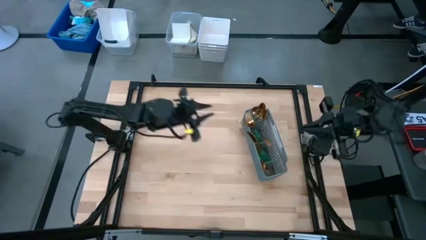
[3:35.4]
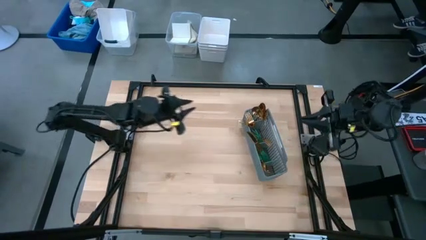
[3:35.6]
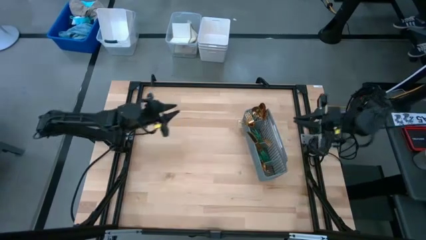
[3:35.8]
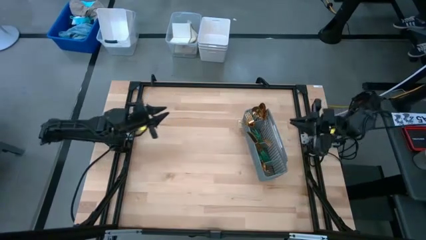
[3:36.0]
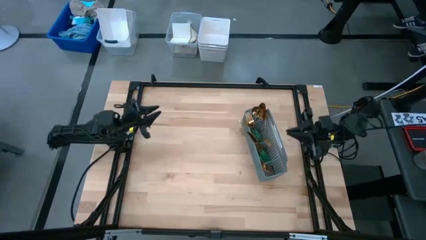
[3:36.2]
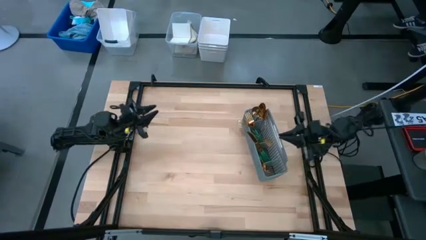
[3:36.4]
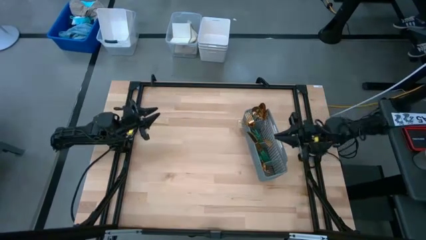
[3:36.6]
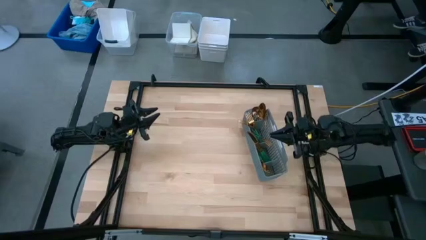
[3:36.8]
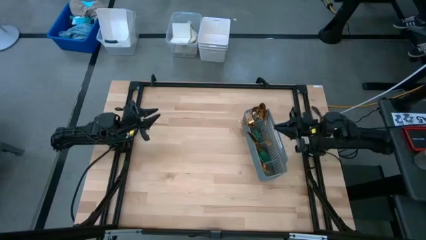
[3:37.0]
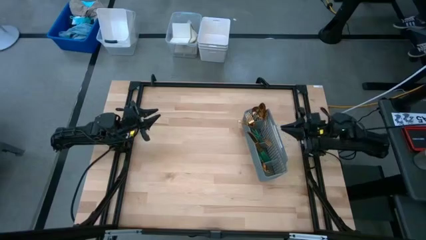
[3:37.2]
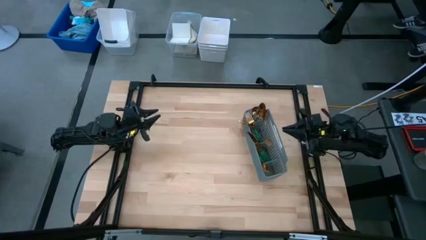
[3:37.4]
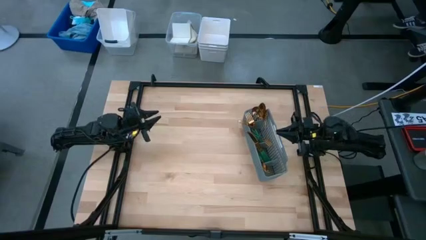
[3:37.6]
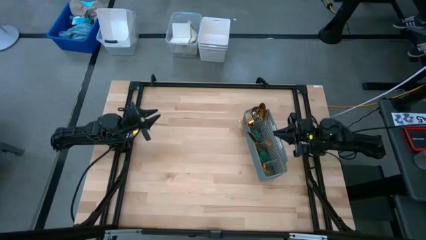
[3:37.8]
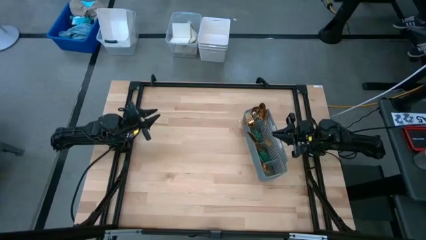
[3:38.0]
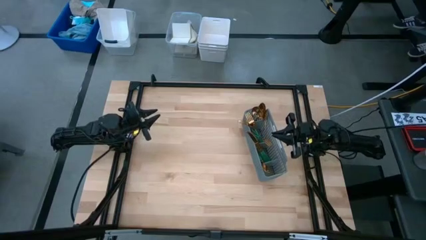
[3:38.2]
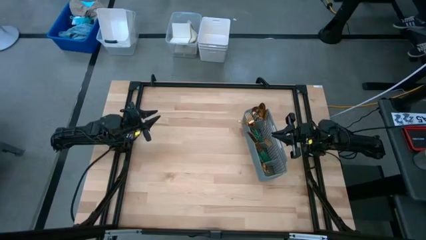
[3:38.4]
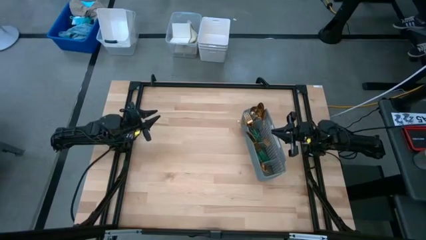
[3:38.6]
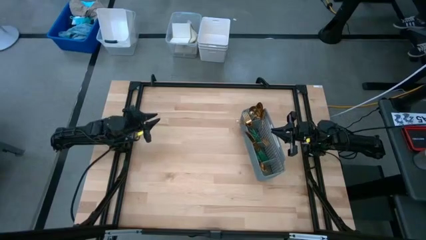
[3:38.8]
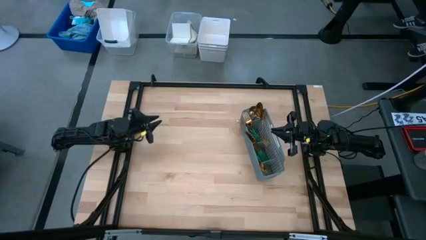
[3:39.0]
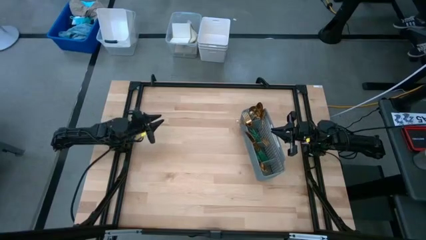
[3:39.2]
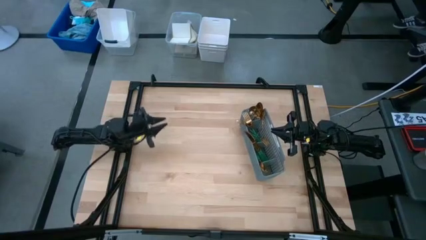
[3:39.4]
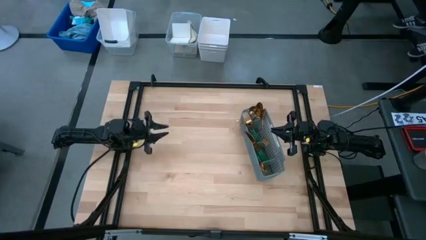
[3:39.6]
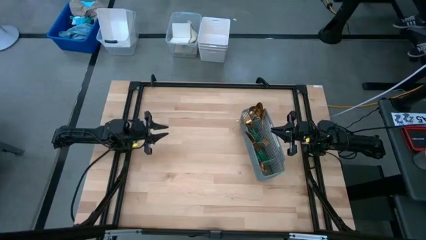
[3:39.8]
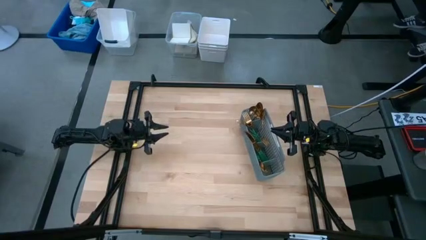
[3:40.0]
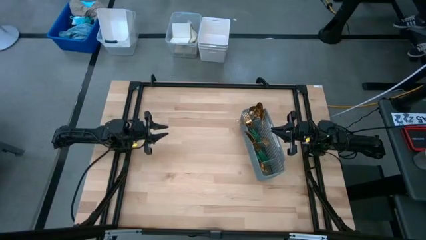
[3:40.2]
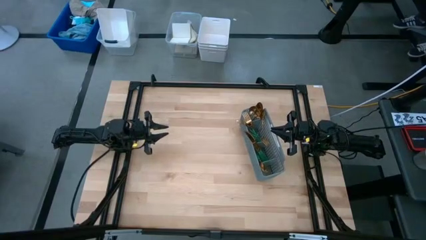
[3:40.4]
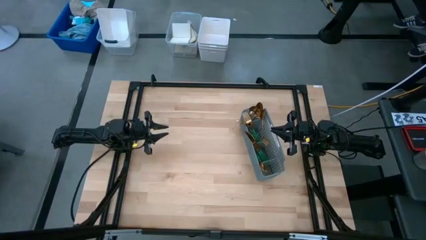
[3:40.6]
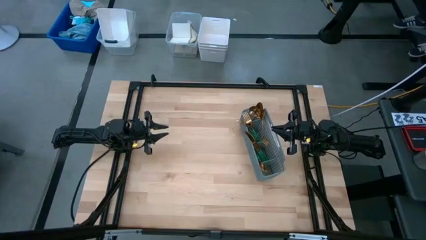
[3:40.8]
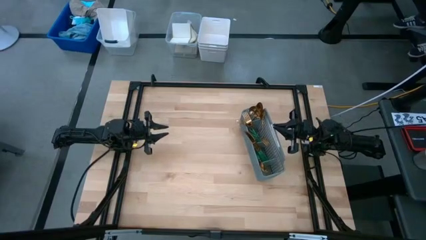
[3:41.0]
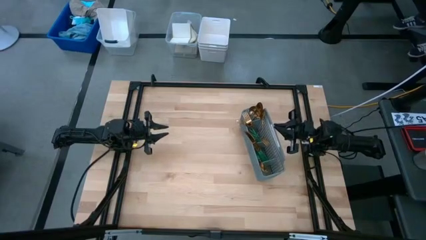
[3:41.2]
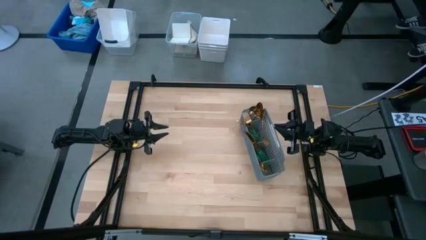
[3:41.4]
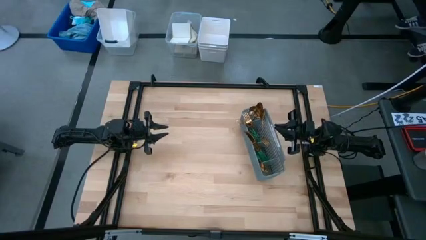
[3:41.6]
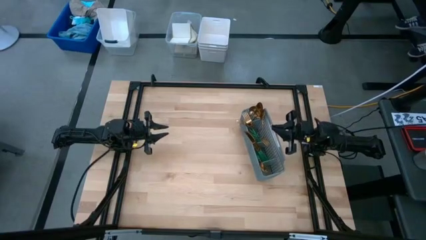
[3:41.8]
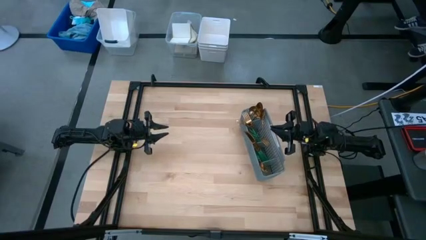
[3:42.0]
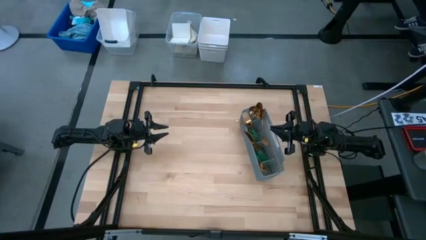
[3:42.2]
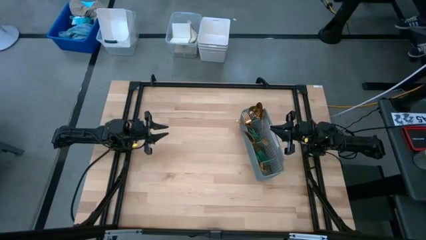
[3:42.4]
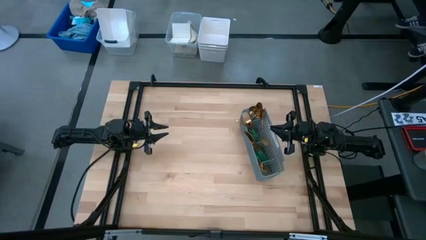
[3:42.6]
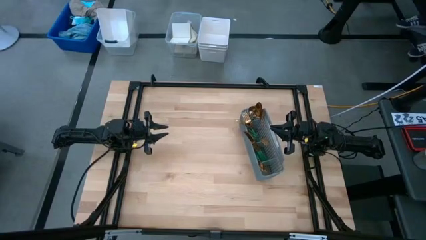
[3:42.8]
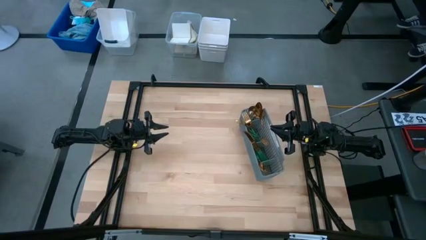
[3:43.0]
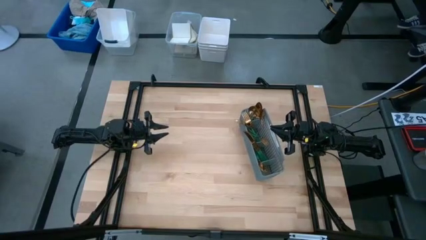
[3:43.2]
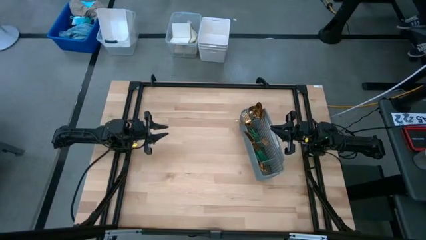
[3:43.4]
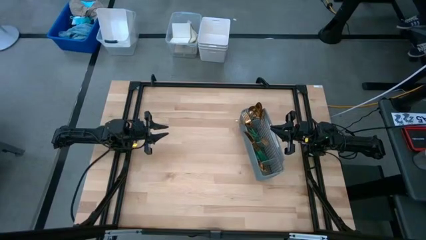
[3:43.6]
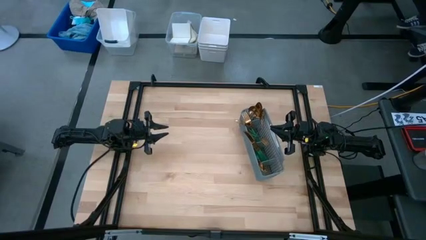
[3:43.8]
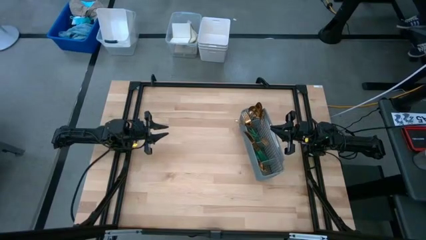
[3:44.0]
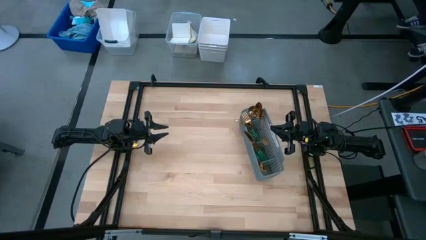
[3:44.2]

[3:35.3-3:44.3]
Task: Sort silverware
Return to home position

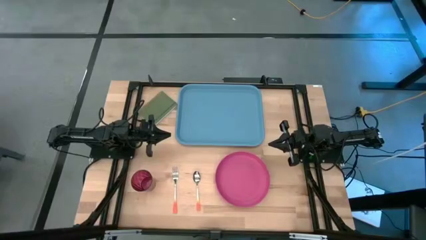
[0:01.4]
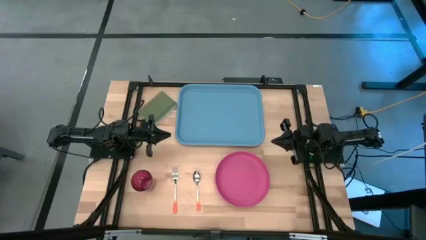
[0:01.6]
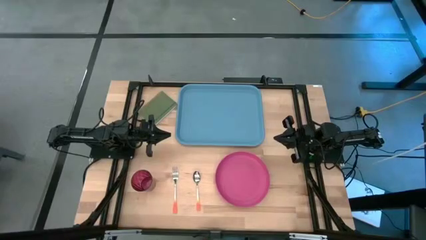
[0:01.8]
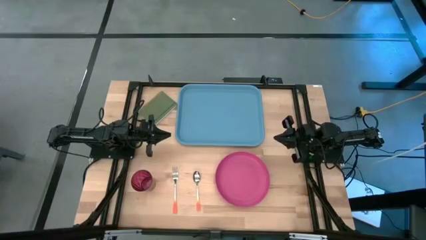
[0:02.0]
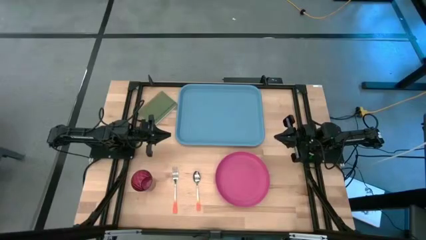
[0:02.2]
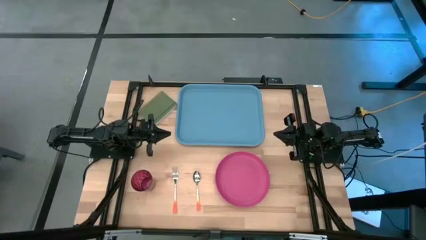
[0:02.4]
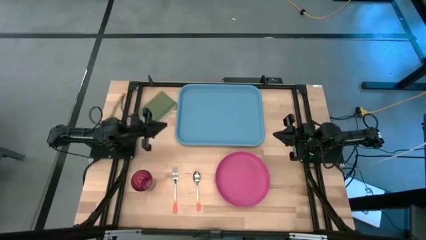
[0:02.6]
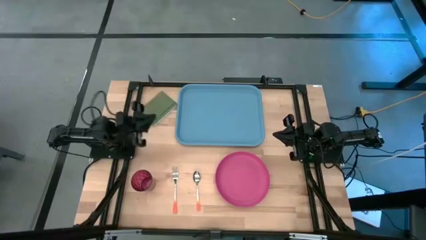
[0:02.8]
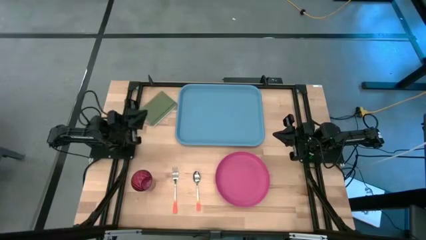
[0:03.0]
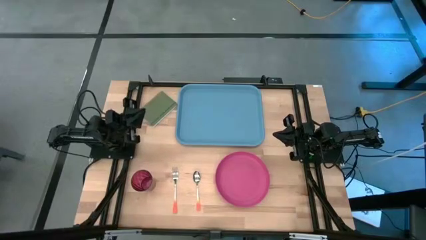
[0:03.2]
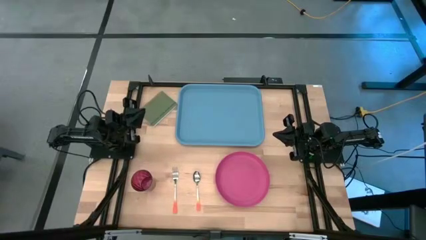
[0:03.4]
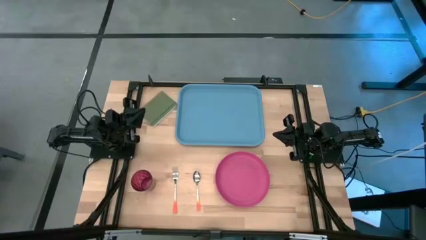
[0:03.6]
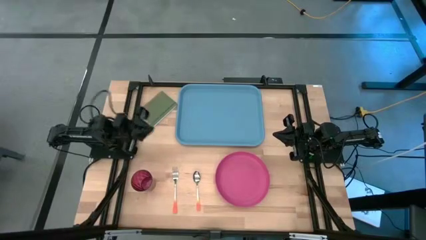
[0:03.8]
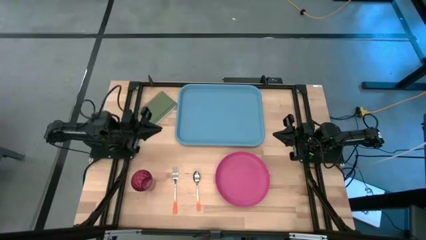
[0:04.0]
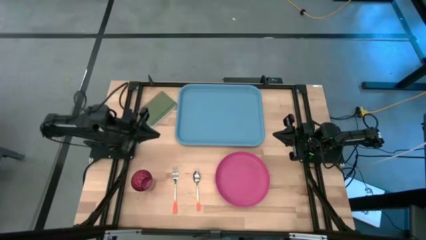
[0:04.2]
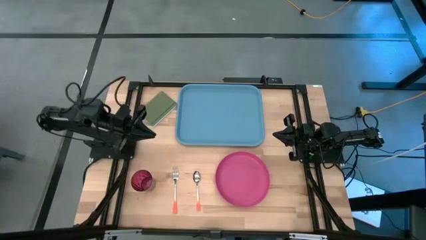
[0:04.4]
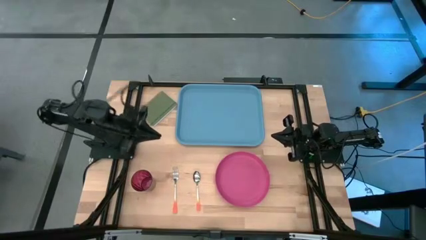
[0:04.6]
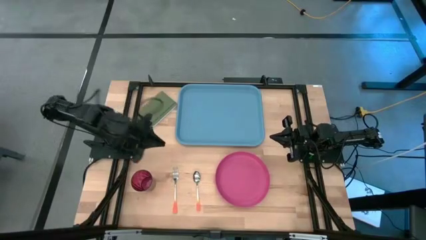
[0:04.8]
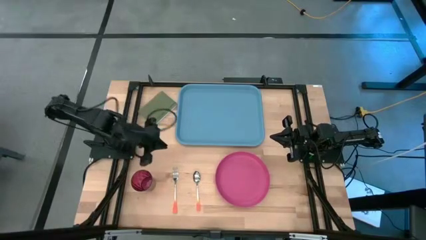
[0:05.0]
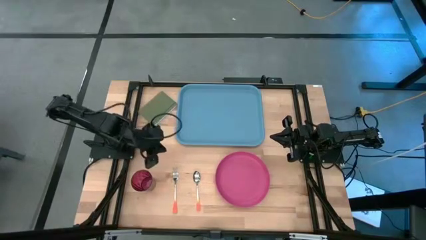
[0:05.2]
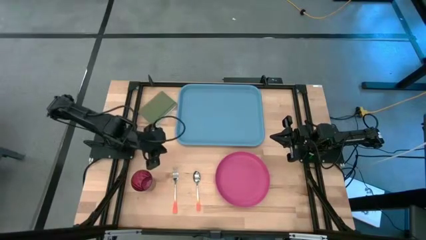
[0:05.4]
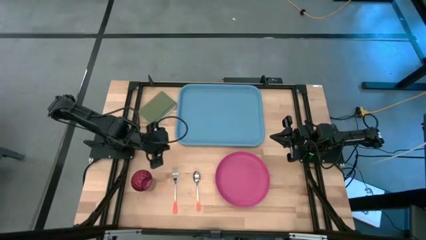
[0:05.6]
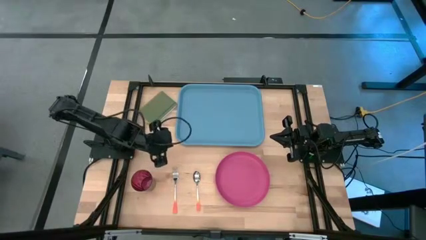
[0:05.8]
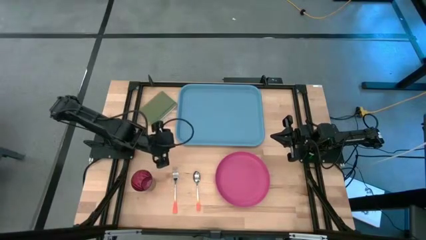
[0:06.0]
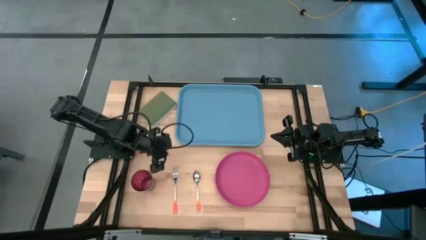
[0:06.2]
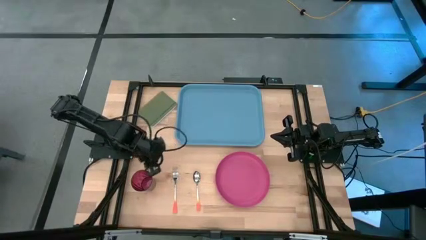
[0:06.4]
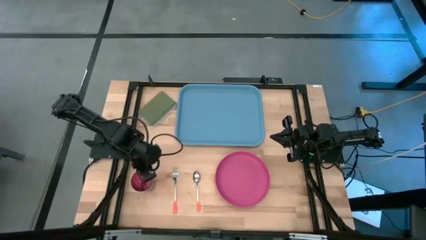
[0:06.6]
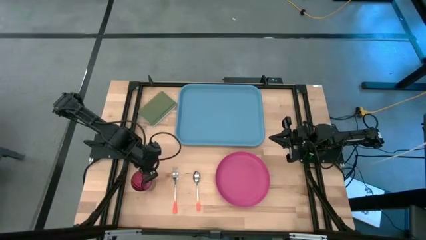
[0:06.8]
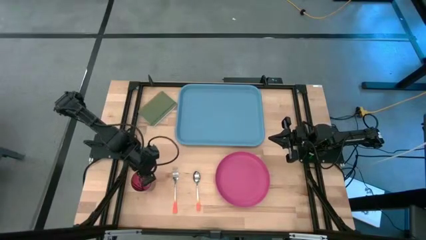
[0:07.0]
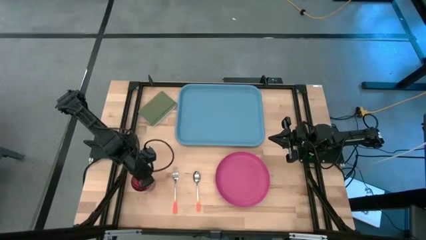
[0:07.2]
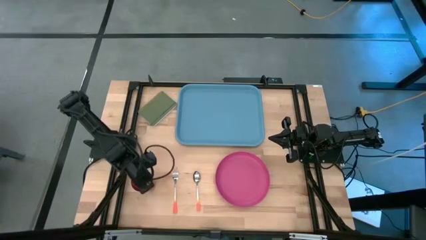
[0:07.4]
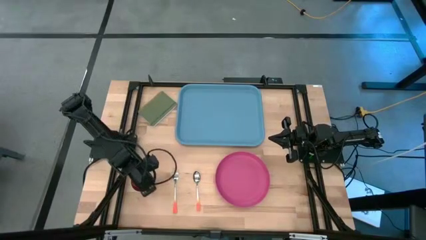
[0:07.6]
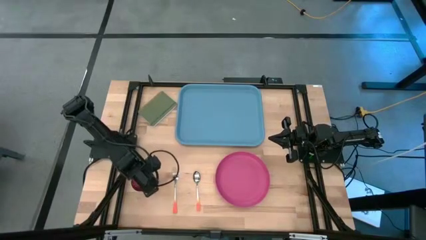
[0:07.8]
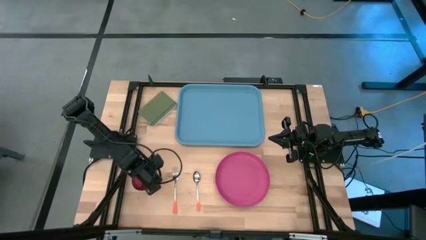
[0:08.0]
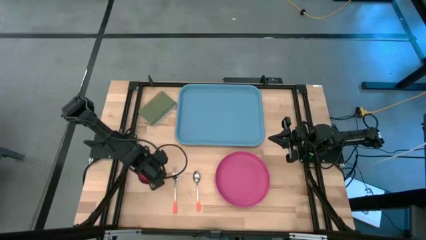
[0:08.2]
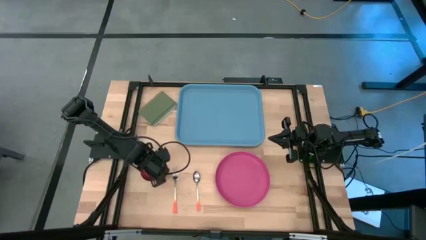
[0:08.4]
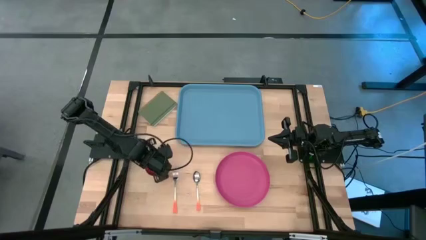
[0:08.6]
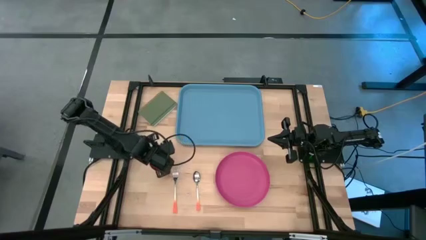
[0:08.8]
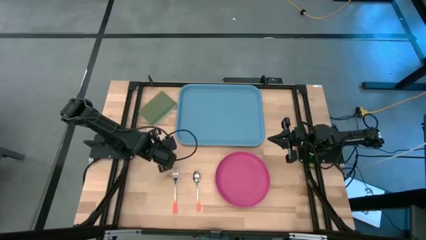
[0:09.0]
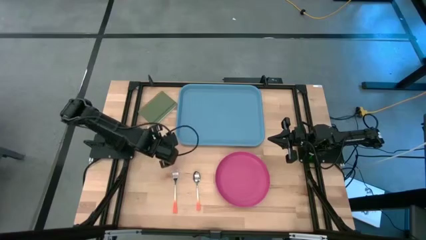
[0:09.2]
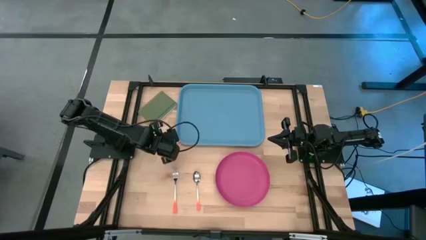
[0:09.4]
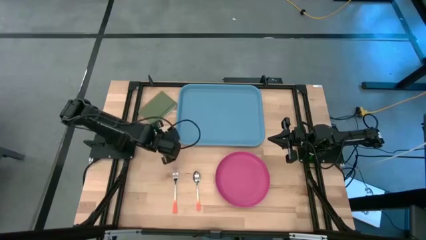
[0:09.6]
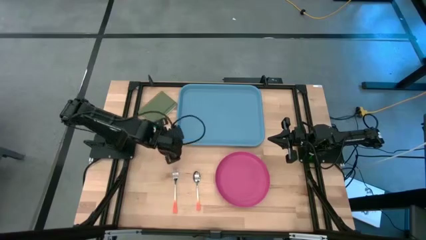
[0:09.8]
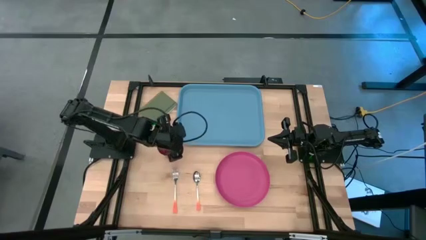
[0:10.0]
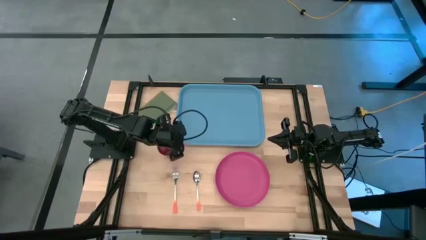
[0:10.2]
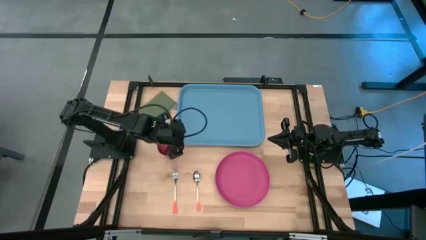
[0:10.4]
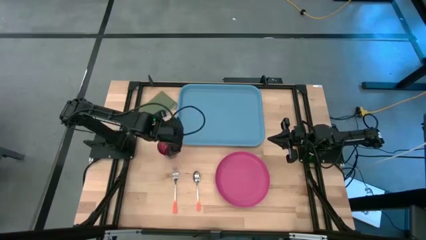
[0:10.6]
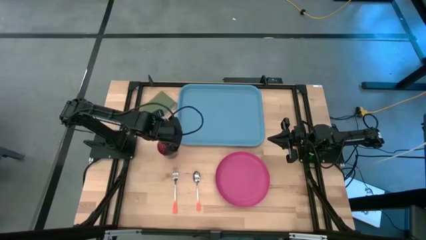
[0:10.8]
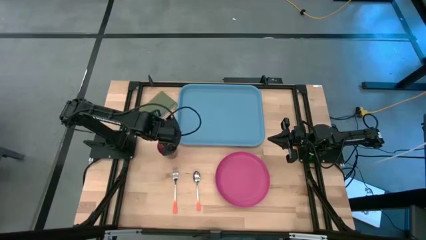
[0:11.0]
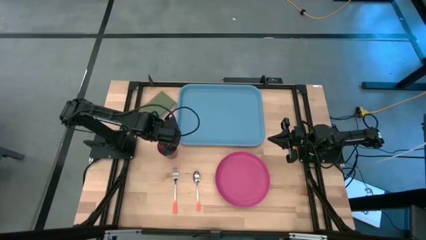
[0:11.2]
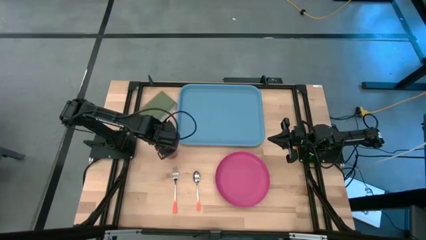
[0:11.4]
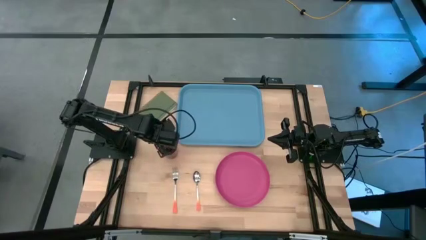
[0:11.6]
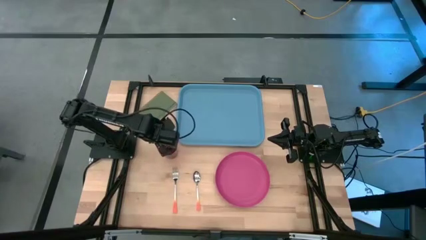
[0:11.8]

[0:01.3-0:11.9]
Task: Pick and place plate/cup/fork/spoon on tray
Put the purple cup on the top left of the blue tray
